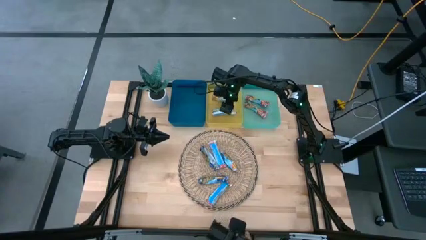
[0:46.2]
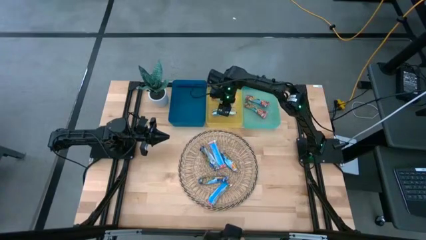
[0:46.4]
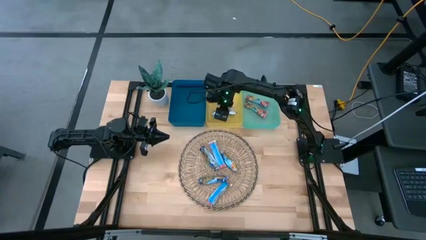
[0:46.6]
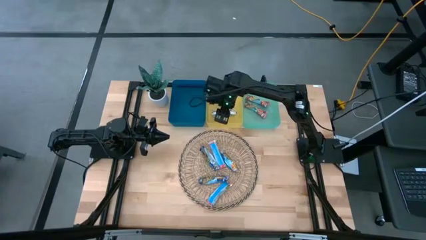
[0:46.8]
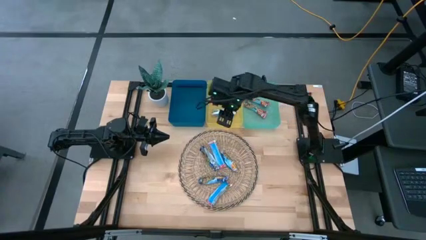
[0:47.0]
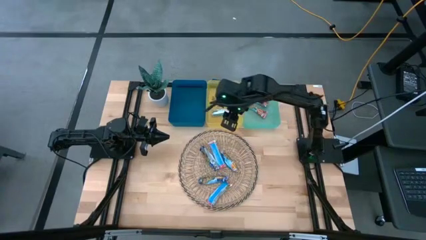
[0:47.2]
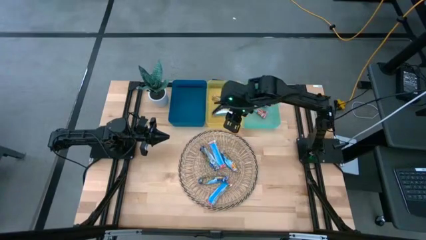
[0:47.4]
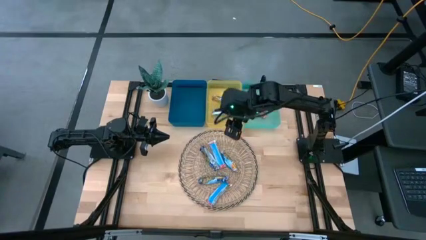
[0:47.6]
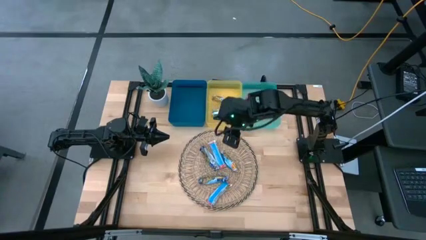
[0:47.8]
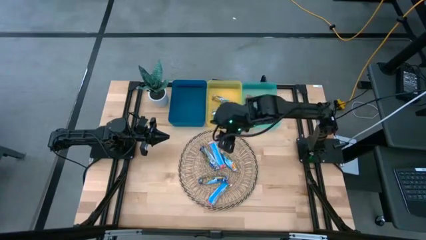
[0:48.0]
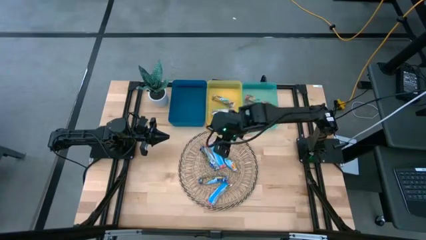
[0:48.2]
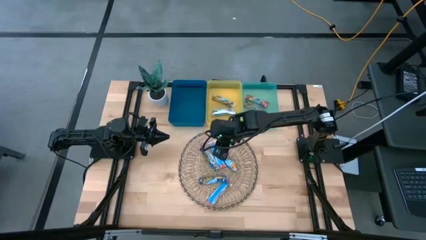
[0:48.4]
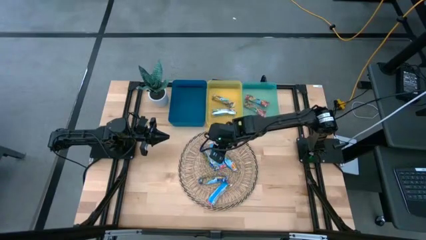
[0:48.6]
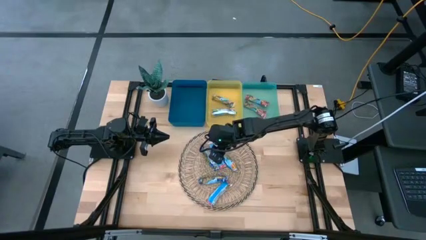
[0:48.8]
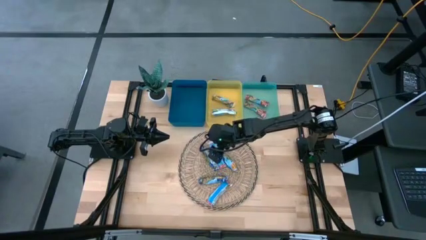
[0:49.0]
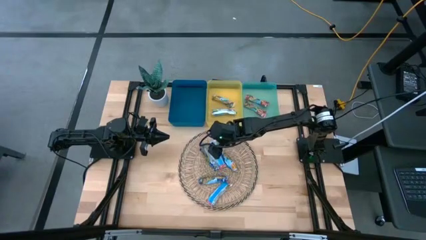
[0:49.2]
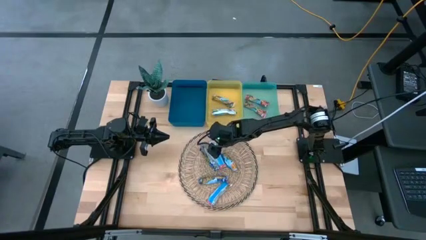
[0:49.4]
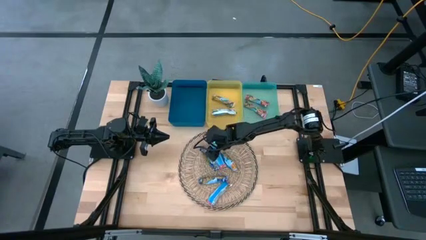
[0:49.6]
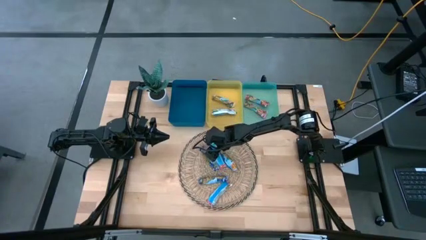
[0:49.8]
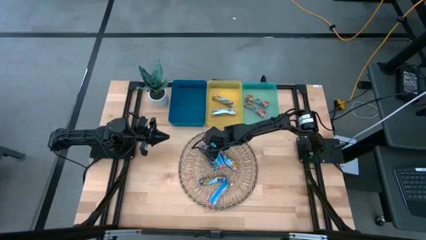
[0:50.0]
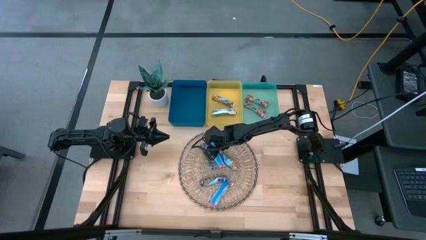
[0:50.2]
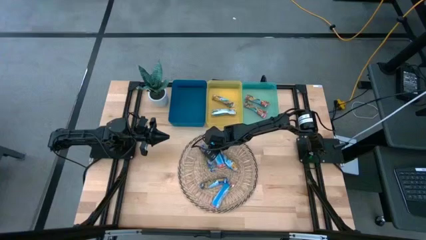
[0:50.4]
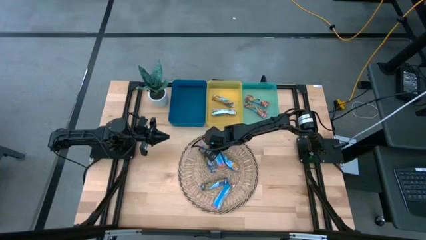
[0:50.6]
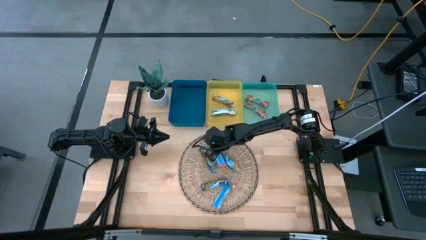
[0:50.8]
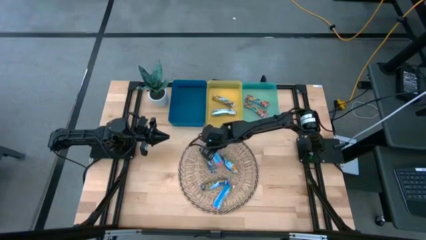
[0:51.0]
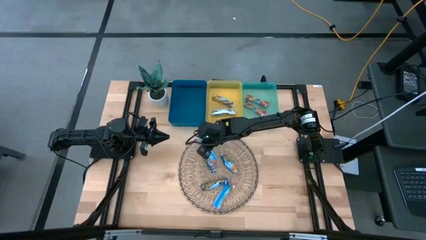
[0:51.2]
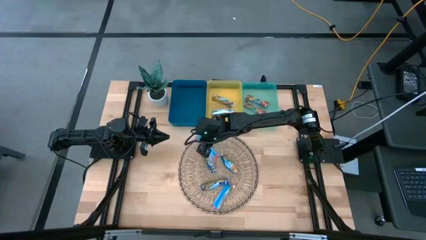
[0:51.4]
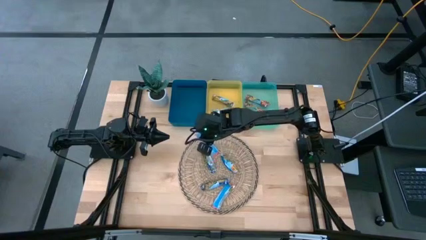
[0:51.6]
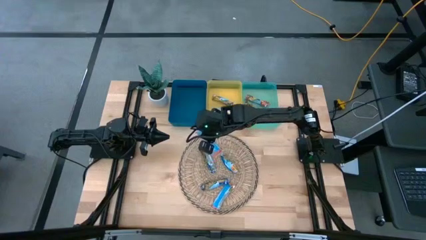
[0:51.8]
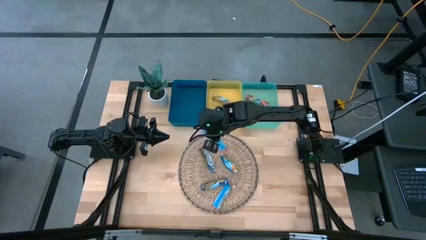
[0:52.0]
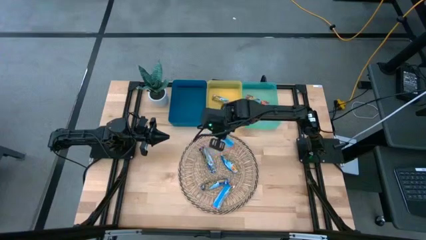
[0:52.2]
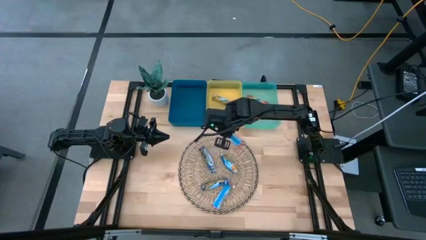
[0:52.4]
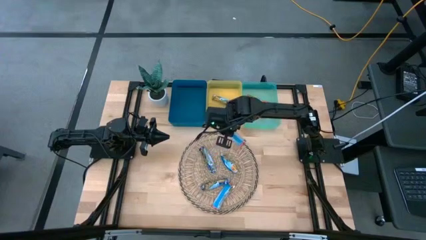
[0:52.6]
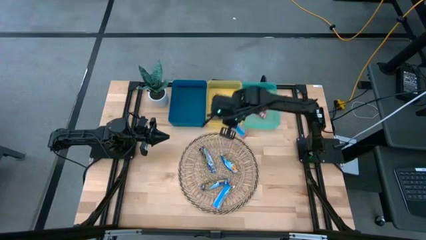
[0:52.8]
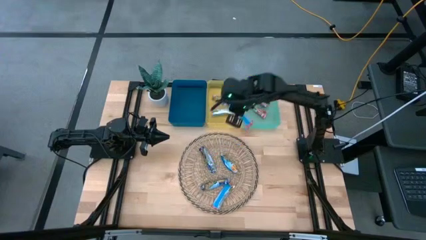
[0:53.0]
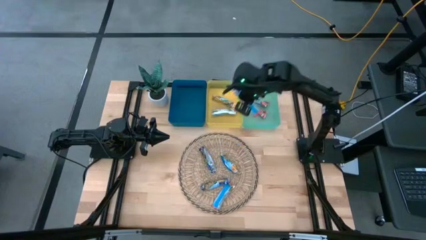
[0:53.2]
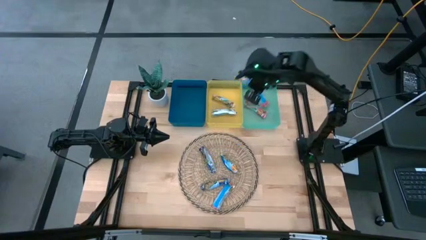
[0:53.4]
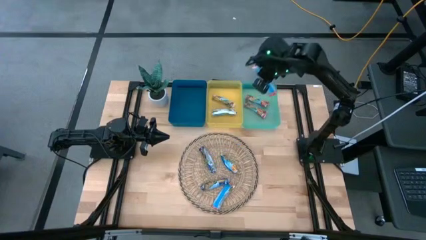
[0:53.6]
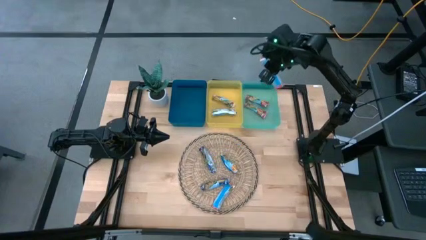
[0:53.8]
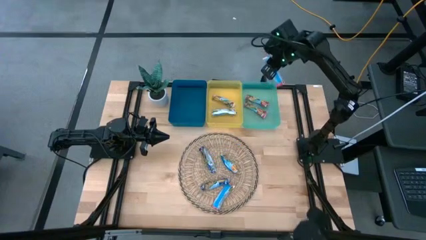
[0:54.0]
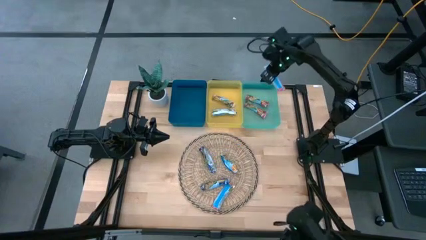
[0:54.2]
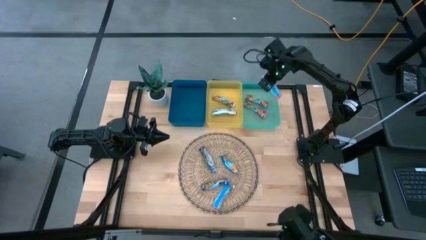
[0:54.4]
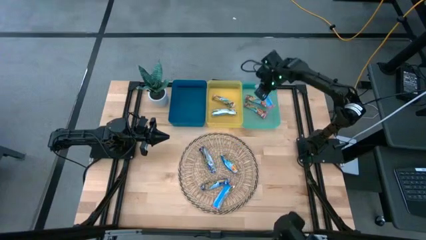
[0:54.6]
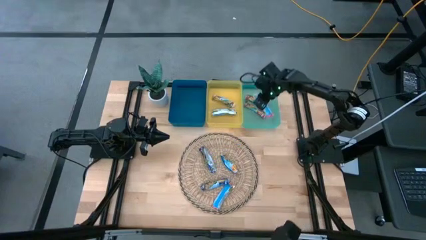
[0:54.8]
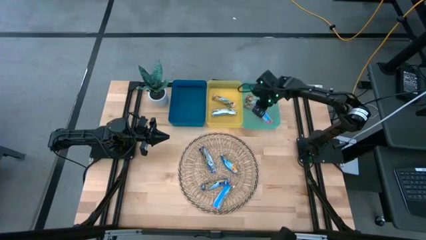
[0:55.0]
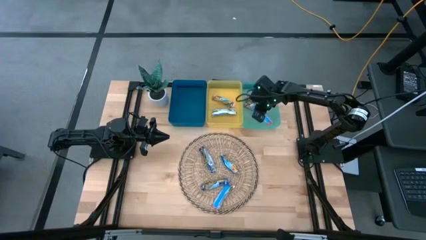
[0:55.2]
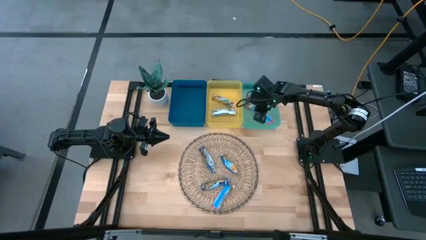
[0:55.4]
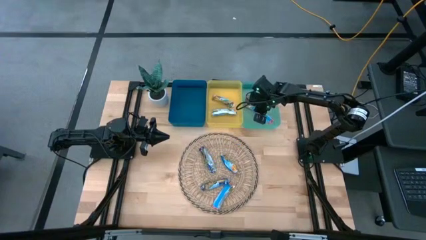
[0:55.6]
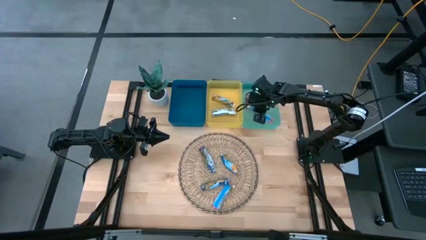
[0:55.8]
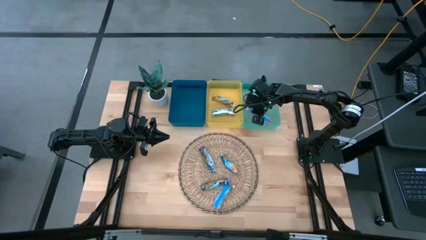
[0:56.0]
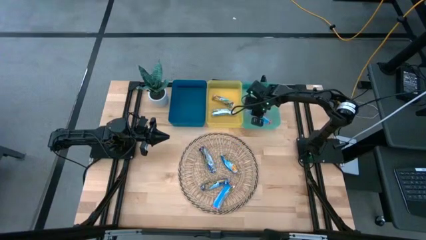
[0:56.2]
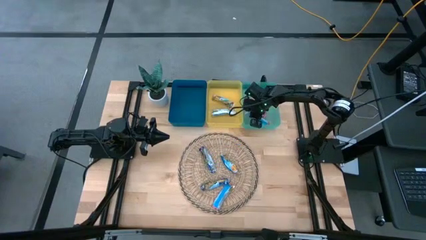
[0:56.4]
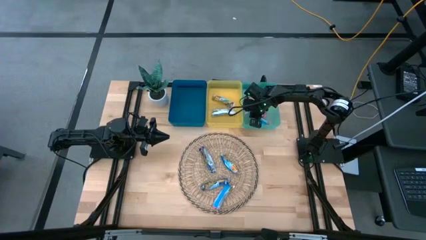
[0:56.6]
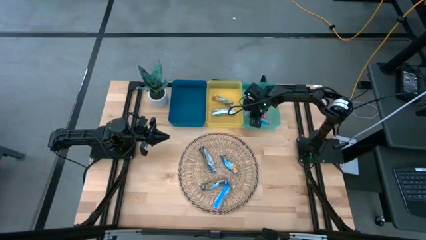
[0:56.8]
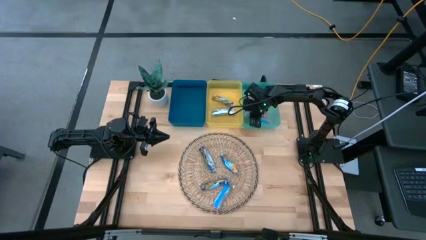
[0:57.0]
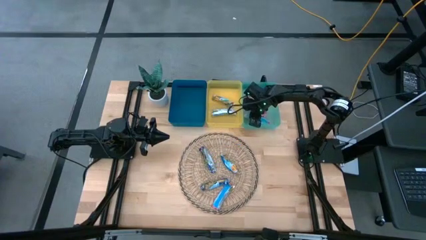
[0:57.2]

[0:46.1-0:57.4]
Task: Pick and place Granola Bars by type
Put the granola bar into the green bin
